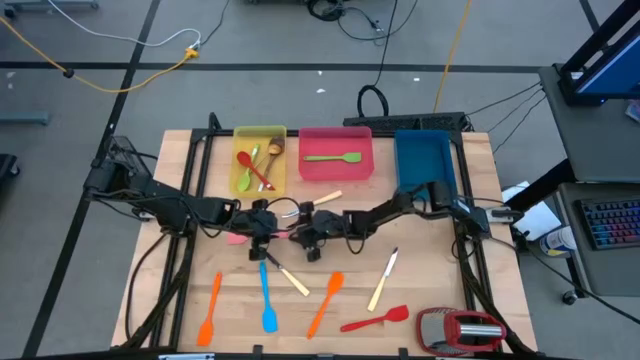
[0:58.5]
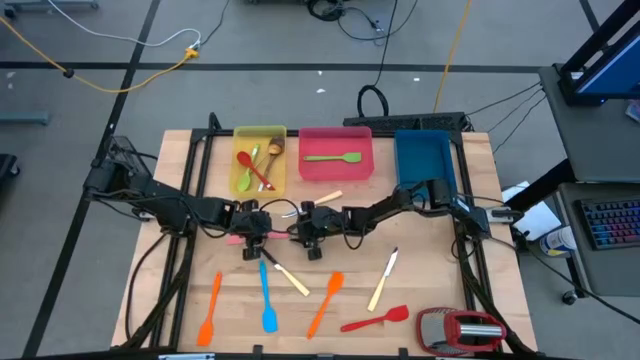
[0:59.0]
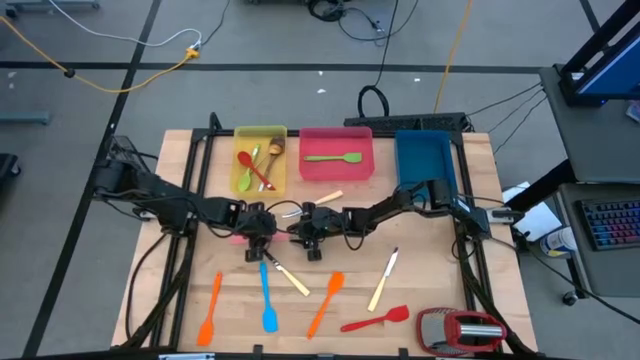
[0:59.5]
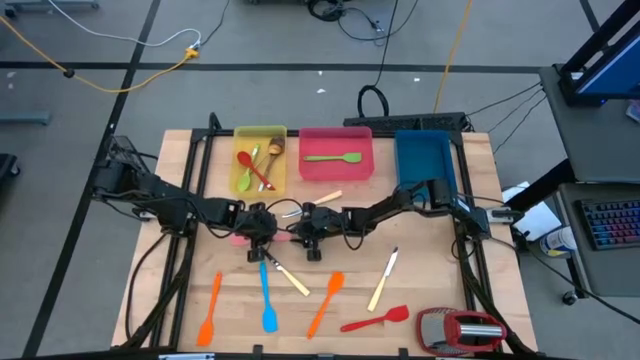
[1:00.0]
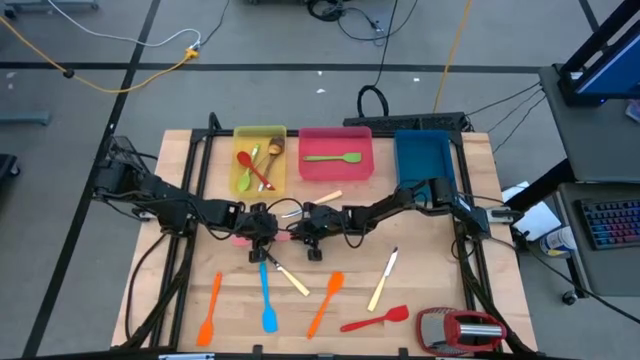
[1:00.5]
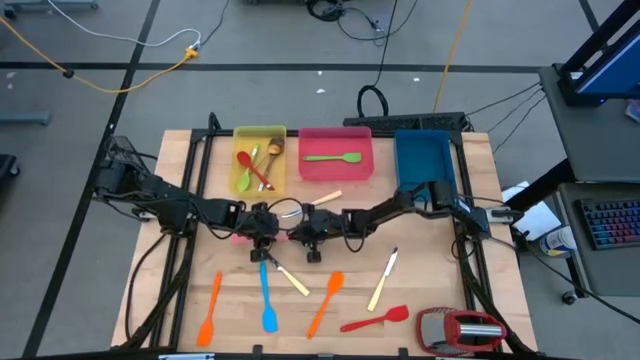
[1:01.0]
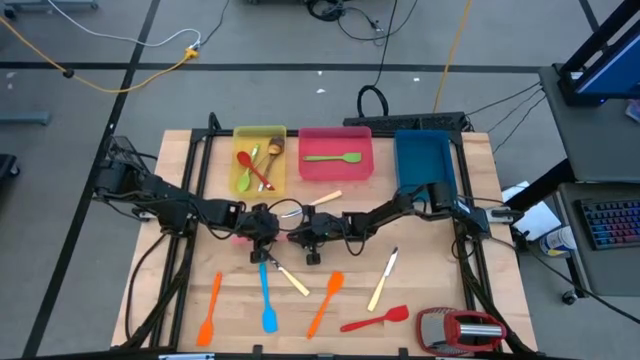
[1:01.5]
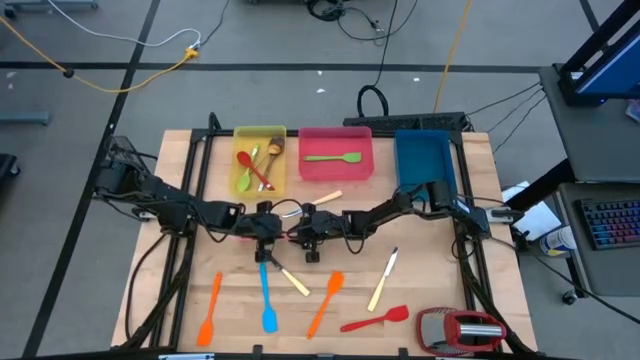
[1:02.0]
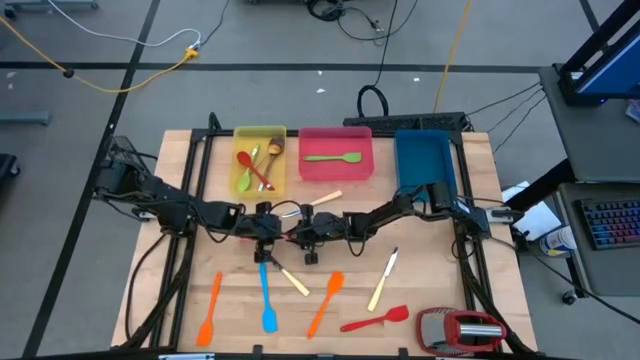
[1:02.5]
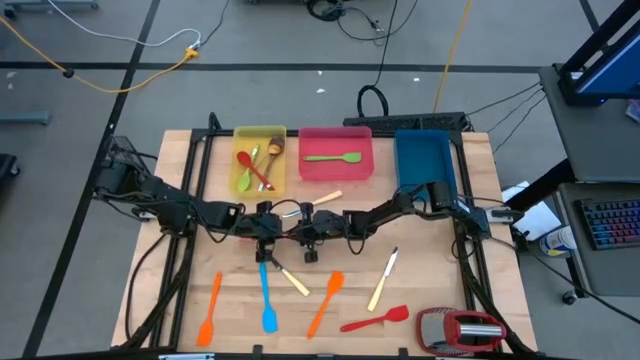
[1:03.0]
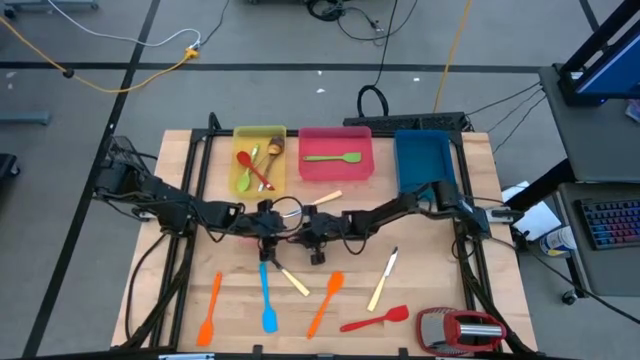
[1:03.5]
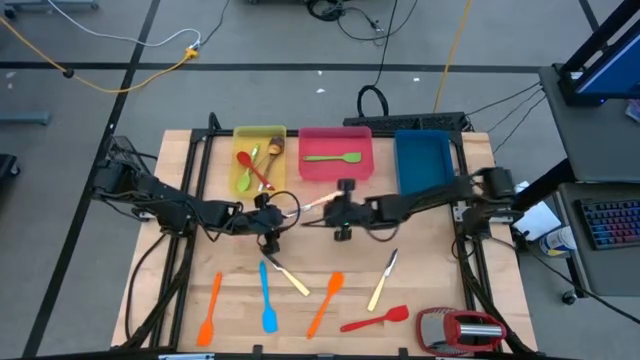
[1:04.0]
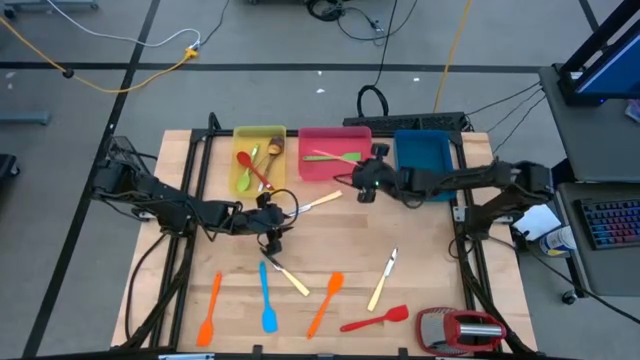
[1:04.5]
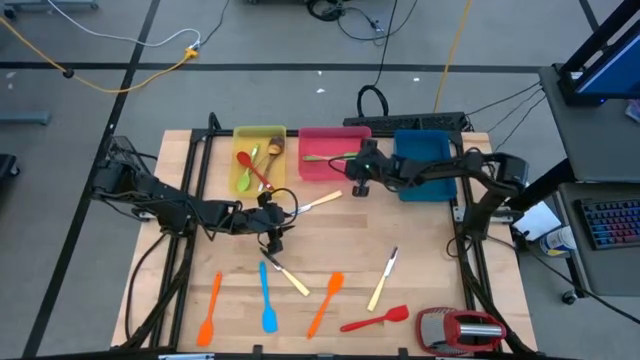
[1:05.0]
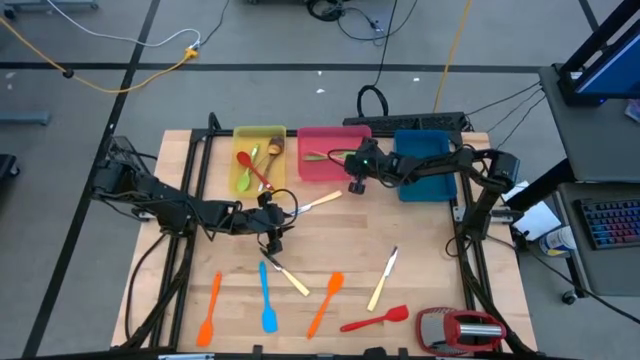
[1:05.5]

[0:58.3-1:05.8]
Task: Pick & Place Kitchen Items
Put the pink spatula into the red bin

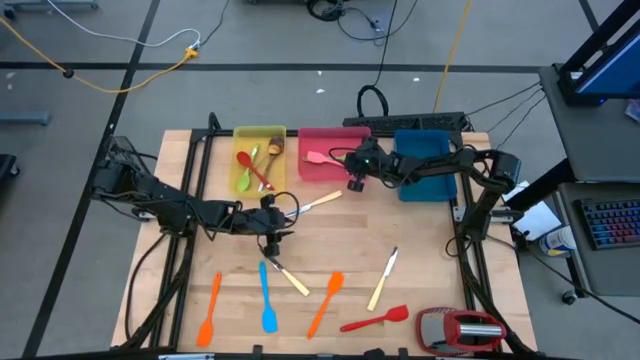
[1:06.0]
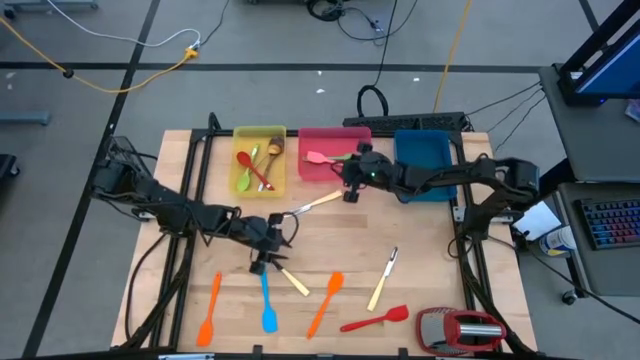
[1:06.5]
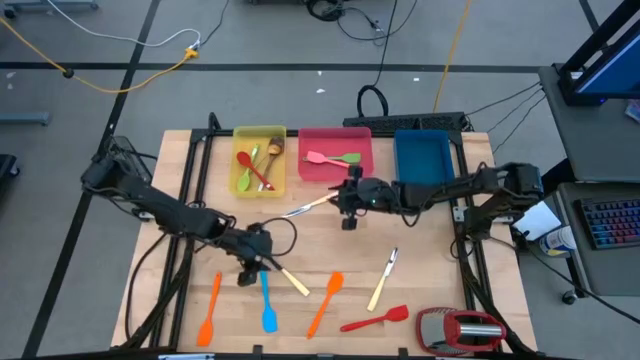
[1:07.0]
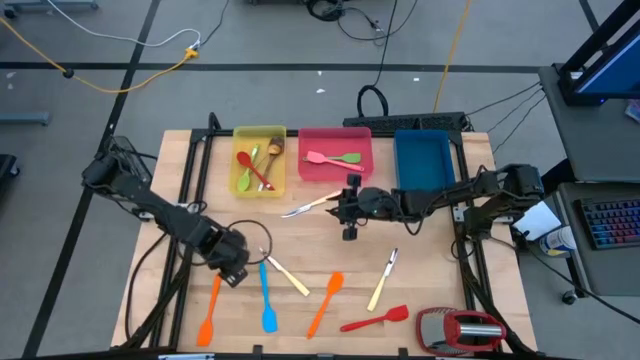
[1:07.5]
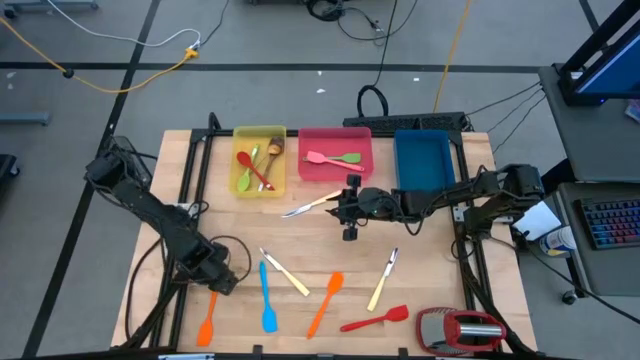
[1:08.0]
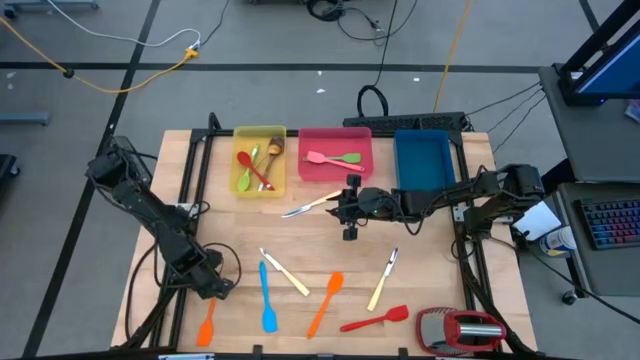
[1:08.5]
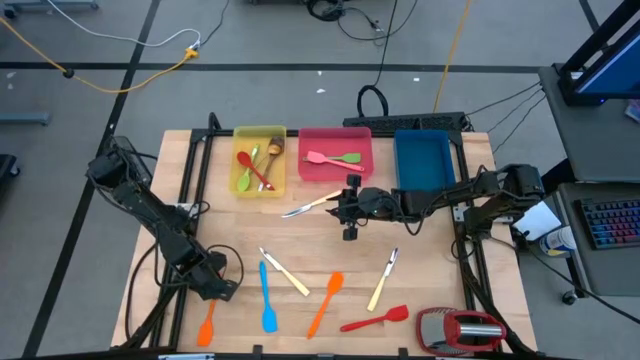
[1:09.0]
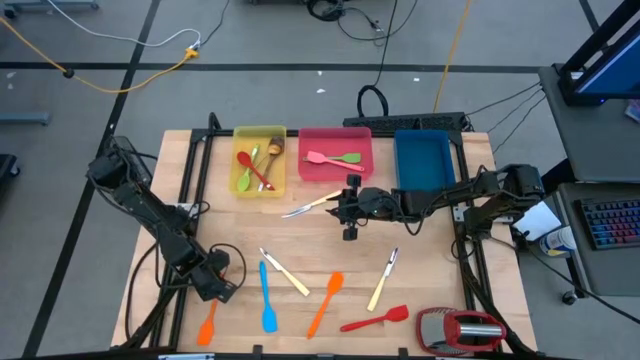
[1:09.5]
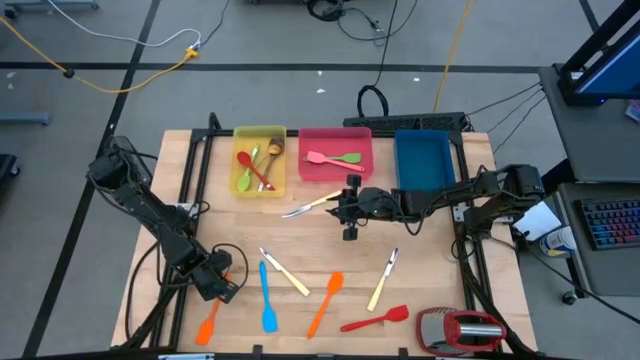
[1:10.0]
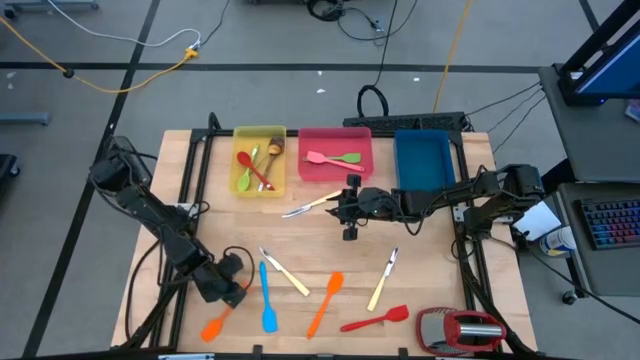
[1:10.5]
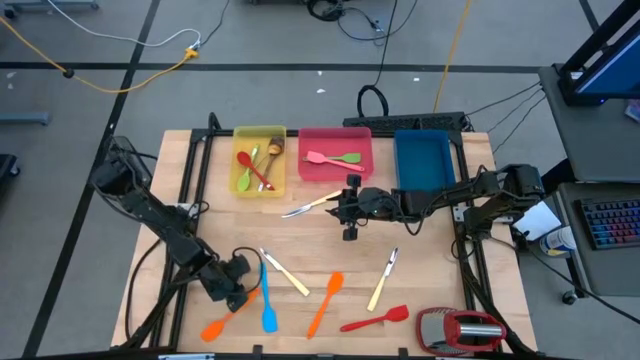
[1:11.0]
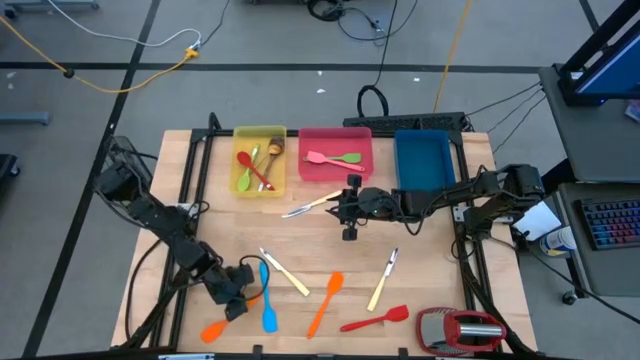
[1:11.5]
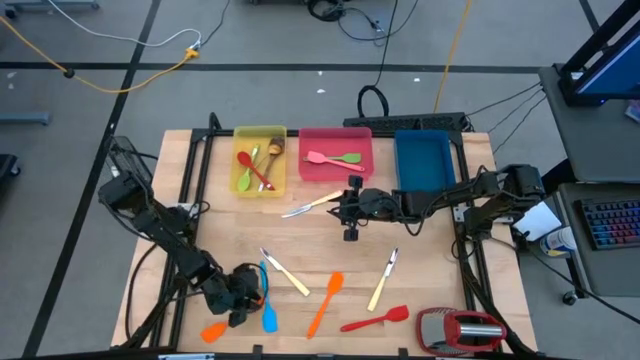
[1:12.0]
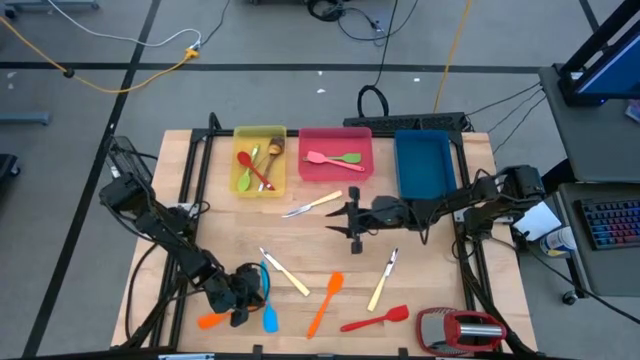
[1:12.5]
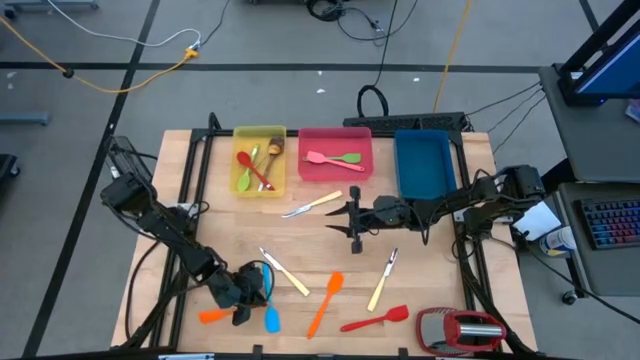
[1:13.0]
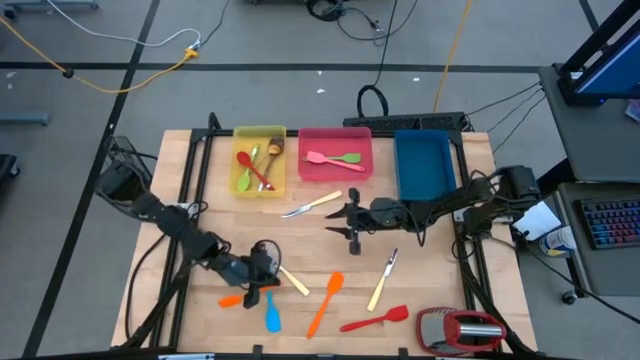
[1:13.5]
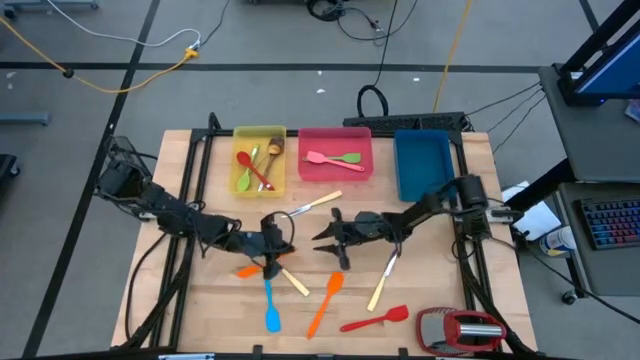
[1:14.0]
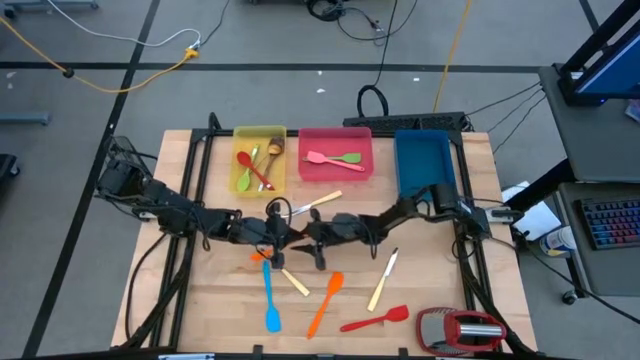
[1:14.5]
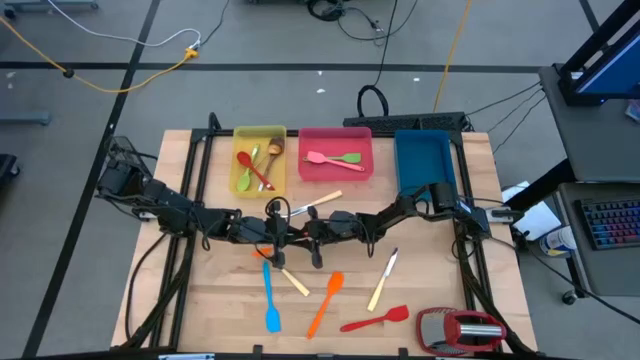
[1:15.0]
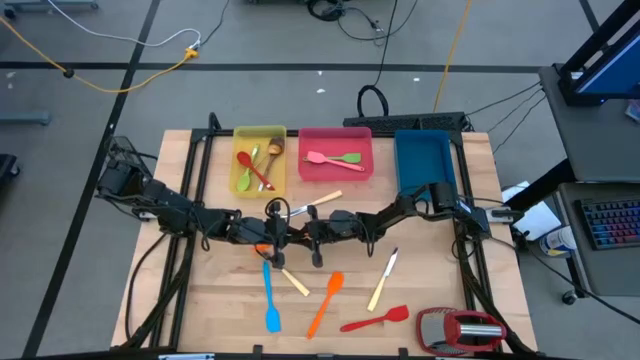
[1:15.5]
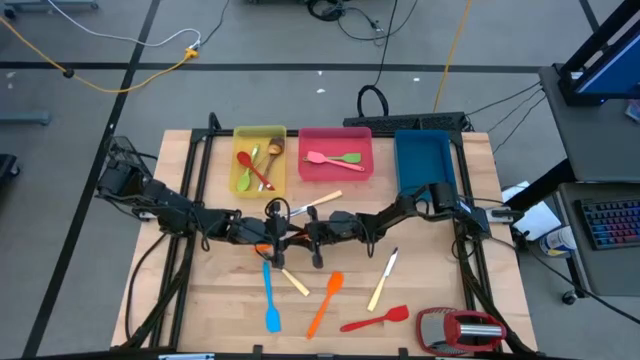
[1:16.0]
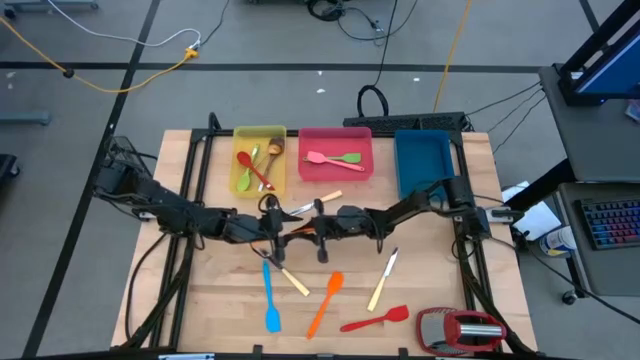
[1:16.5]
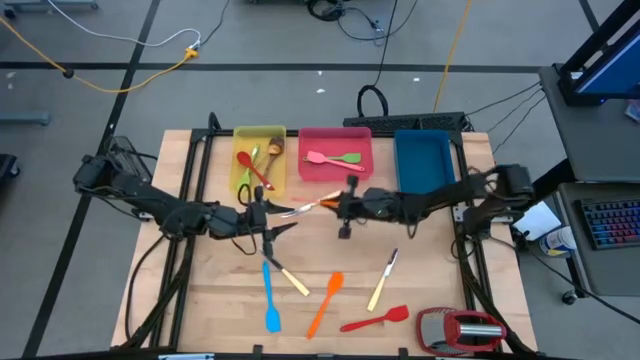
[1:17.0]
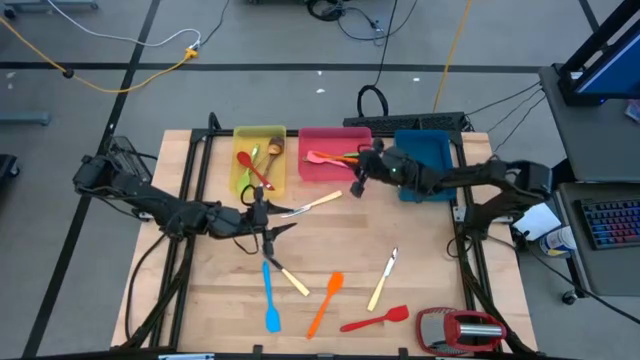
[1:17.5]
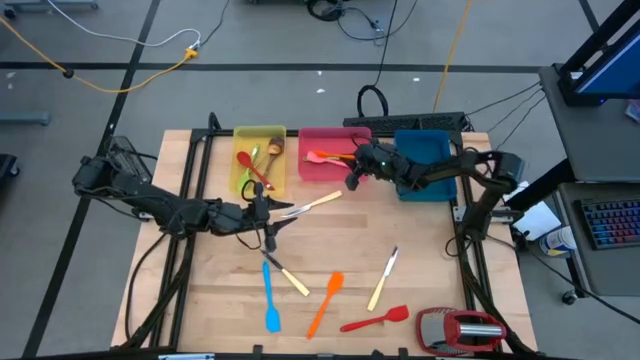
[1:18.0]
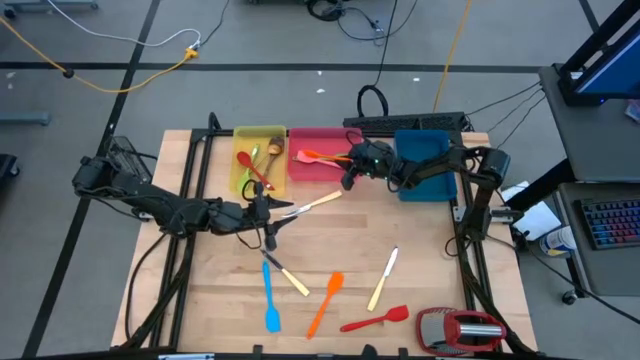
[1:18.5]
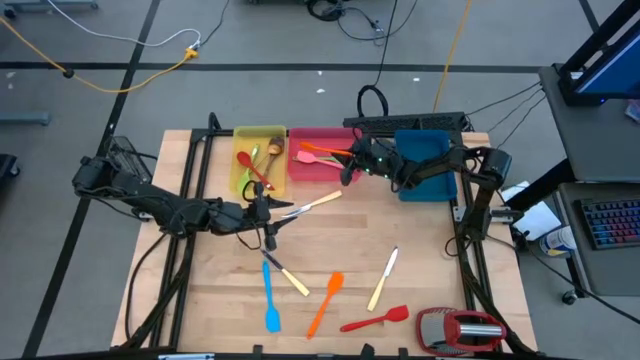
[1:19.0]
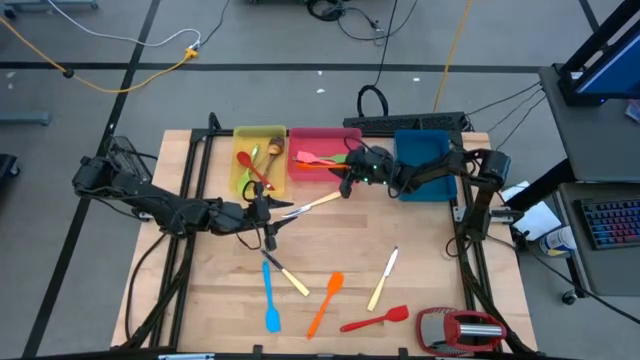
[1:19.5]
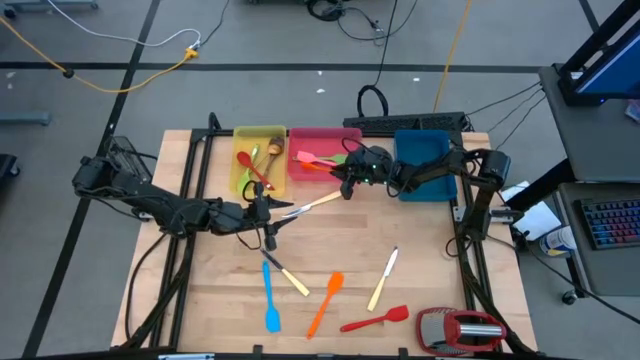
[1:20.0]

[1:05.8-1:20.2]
Put the left orange spatula into the red bin
